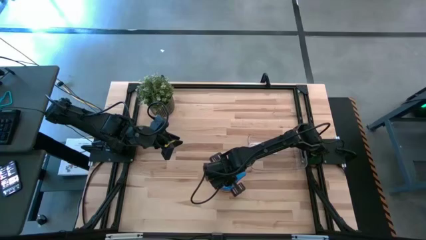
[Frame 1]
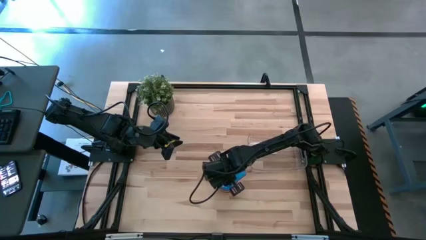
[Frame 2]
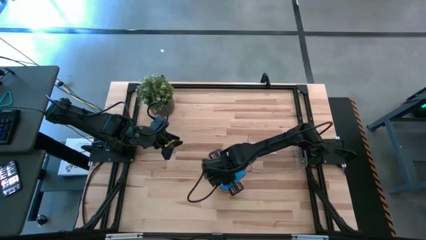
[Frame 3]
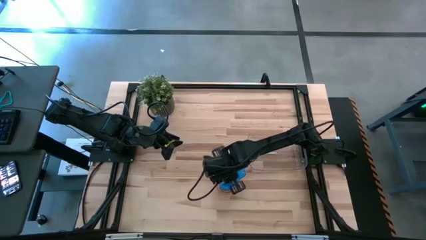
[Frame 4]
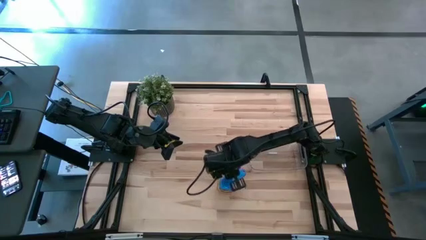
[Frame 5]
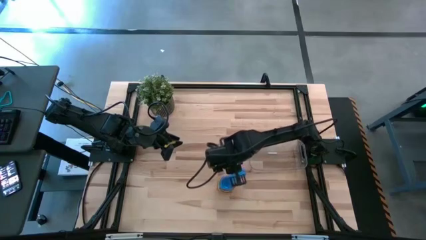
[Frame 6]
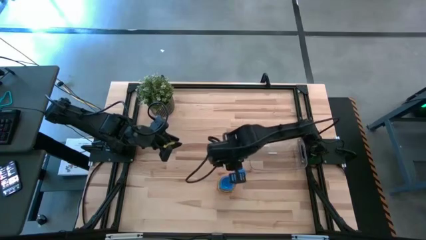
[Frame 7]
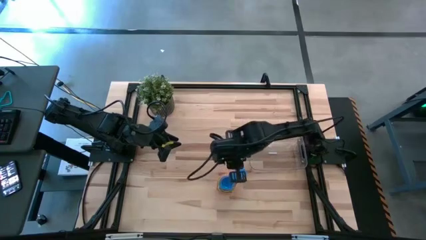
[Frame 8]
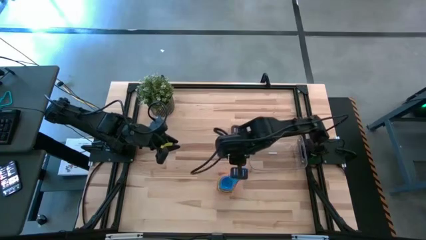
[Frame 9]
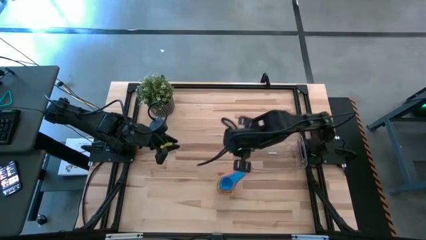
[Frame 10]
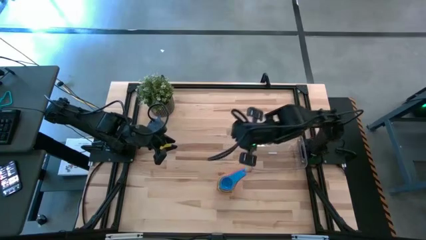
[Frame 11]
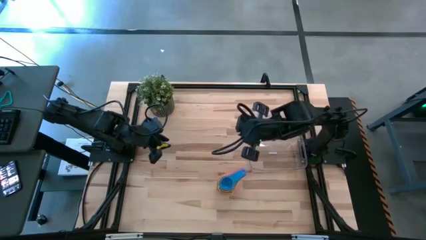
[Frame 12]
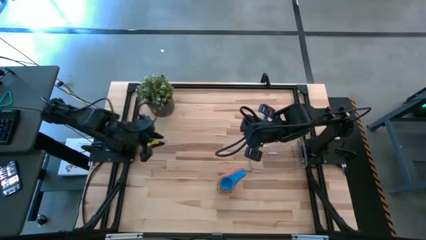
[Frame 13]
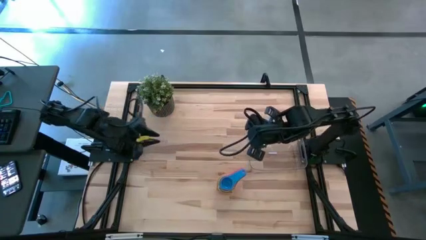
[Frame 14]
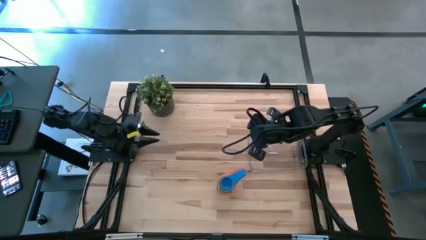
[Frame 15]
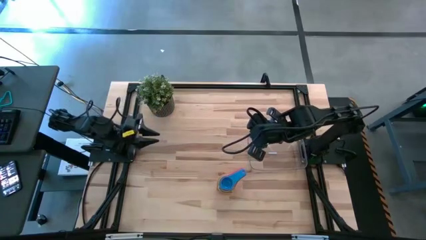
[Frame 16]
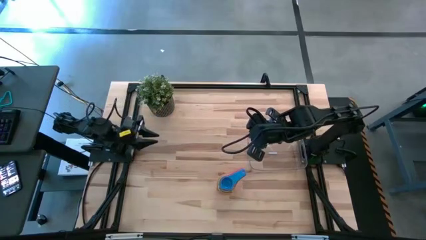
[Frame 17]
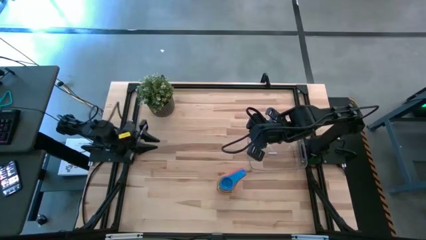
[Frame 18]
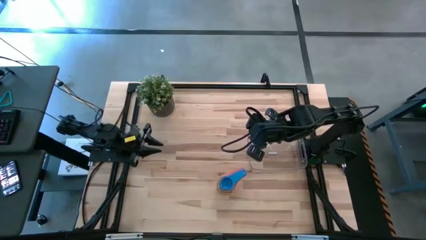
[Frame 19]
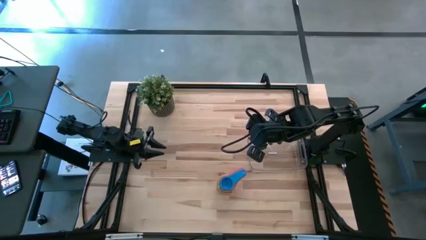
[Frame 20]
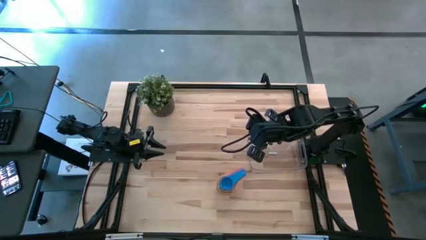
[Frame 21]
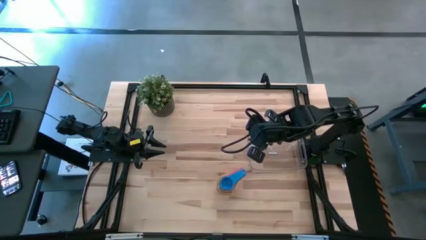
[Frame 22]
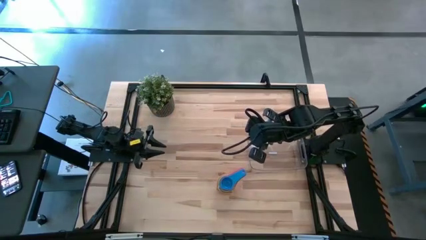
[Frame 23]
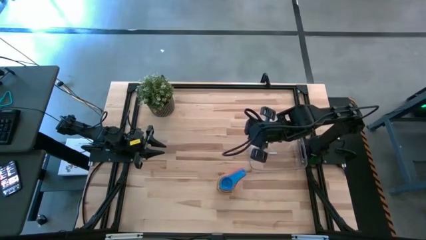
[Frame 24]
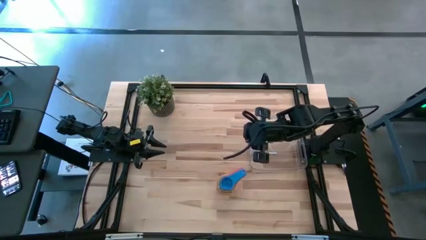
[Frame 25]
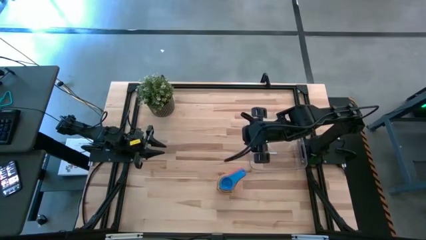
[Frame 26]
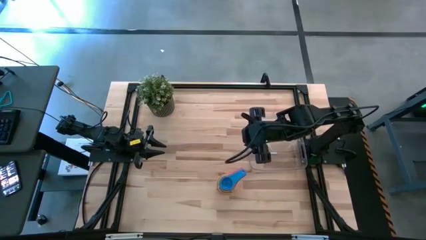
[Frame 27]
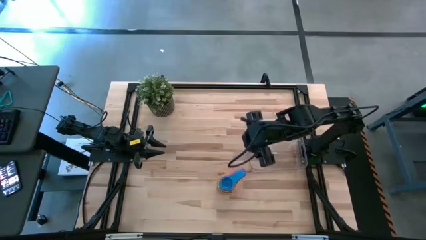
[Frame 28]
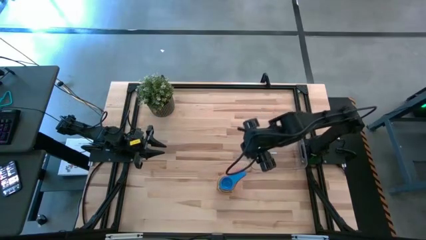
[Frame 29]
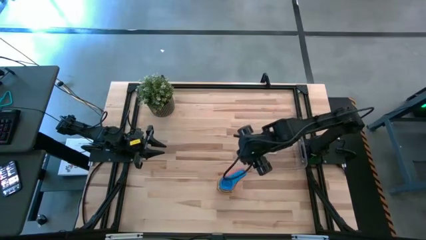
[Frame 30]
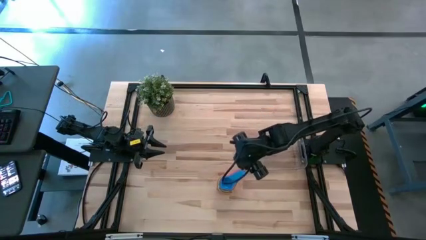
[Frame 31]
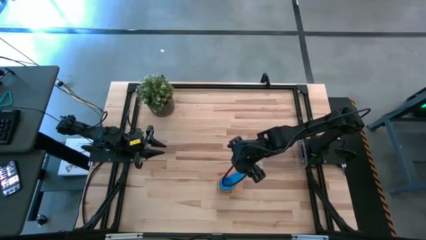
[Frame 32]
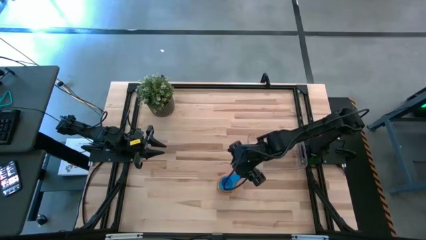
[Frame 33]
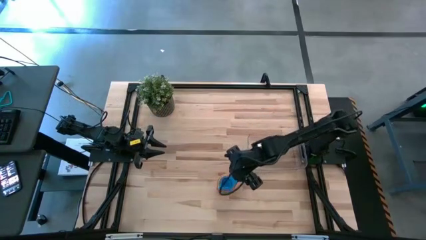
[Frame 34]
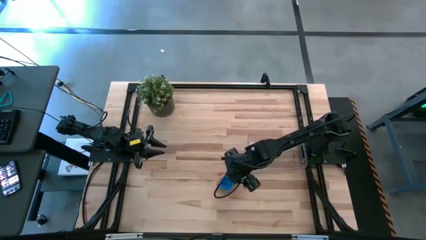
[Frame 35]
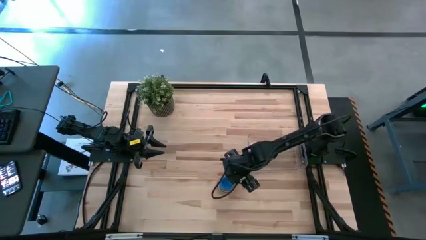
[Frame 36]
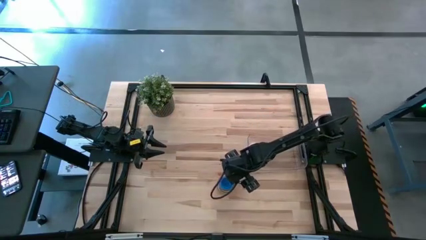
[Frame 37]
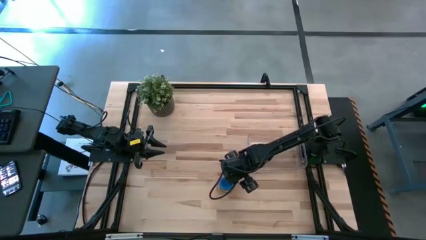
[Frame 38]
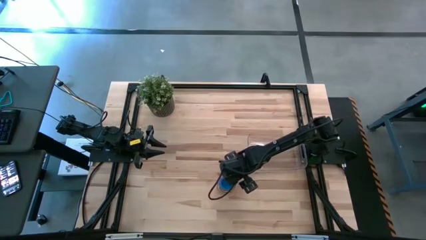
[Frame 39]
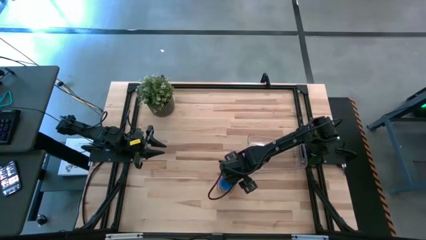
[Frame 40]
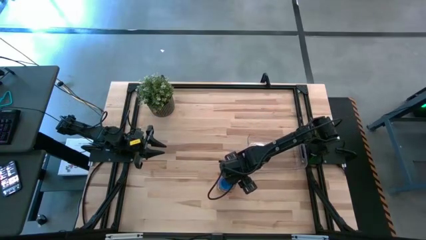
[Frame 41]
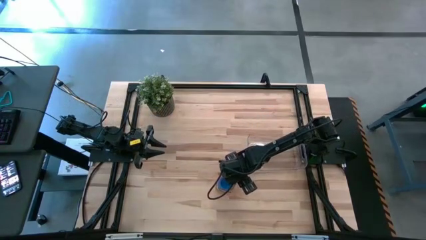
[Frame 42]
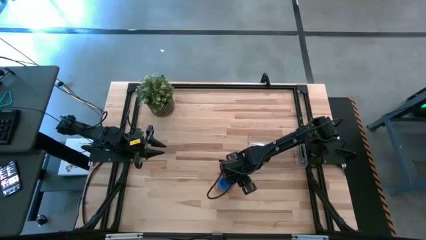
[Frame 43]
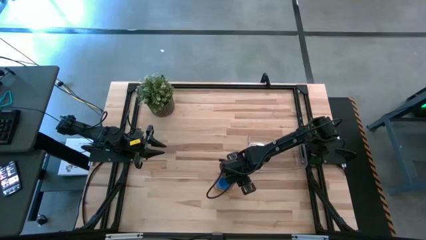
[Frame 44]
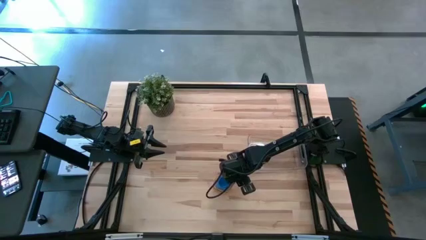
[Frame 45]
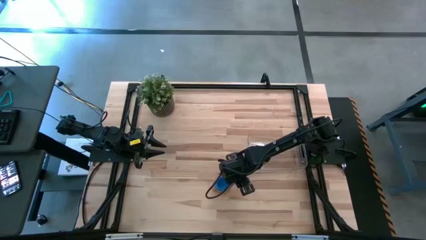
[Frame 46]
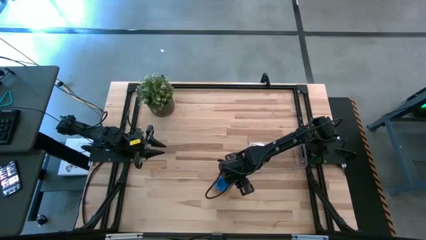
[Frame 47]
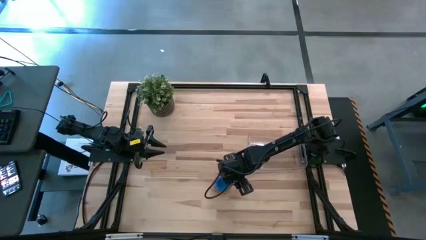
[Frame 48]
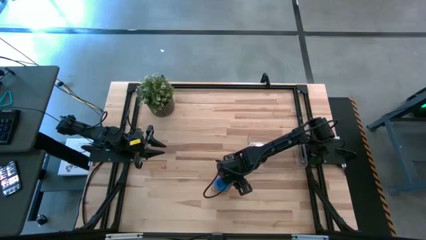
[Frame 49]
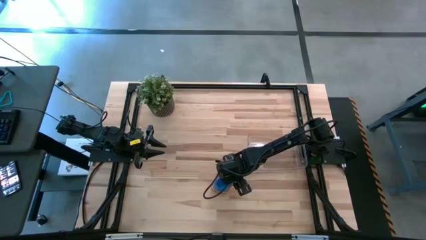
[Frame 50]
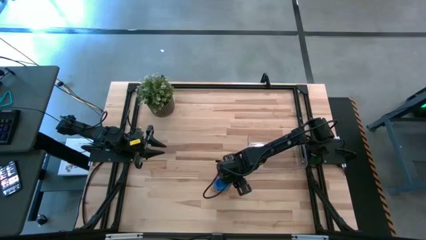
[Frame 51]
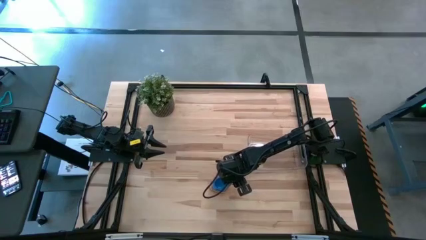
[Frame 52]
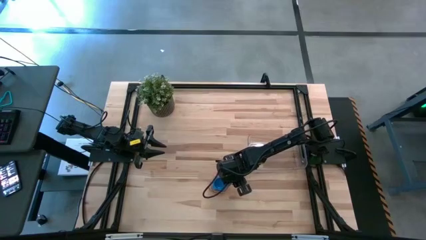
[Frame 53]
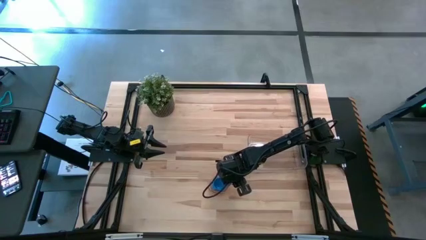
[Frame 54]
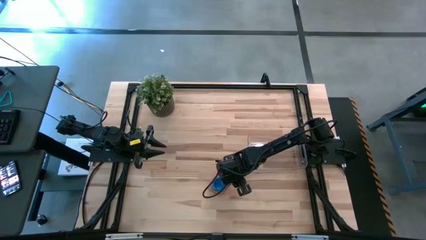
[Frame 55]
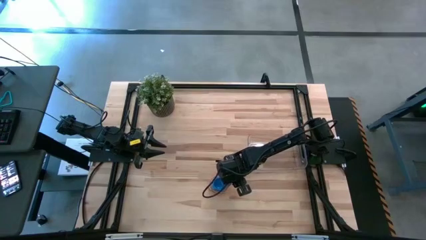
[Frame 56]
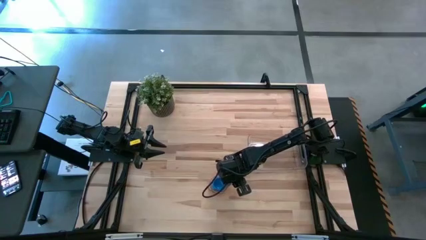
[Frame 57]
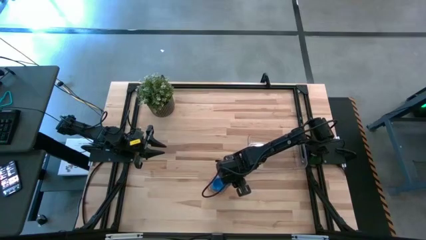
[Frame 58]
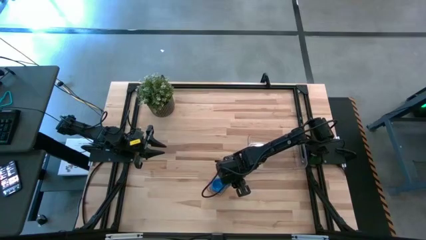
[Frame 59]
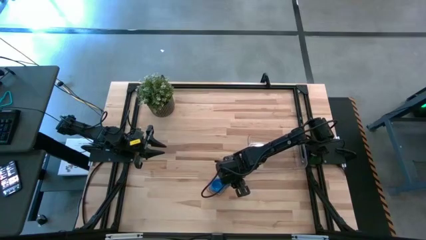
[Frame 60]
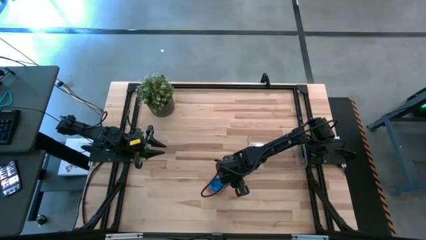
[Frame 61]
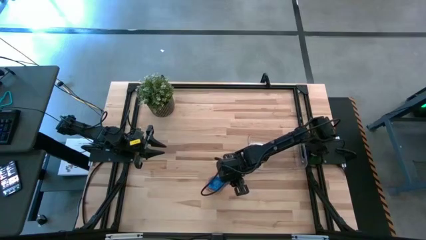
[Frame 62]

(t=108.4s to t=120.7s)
Task: Nest measuring cups in basket
Put the stacked measuring cups into the transparent bin

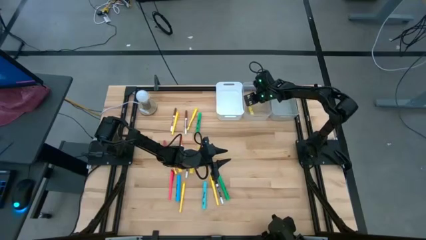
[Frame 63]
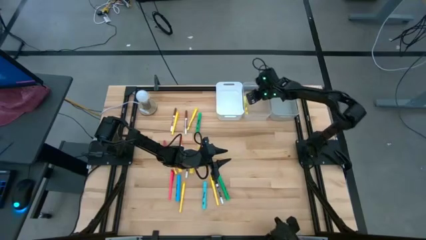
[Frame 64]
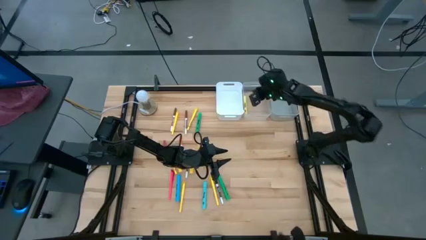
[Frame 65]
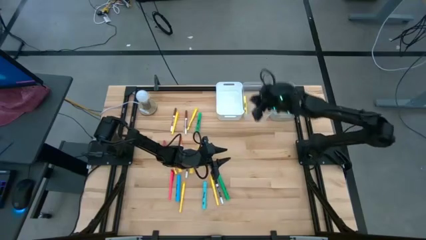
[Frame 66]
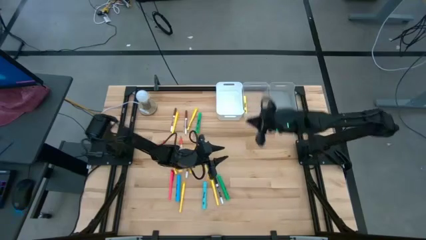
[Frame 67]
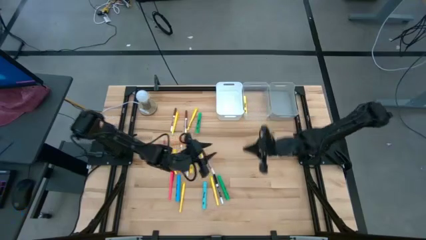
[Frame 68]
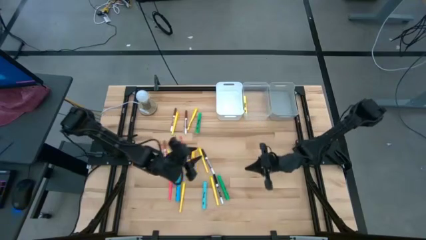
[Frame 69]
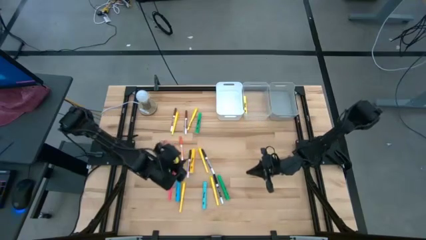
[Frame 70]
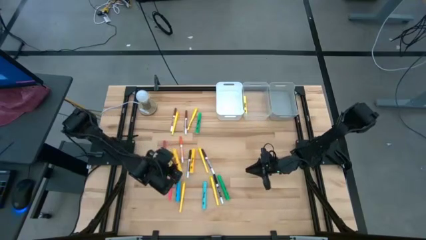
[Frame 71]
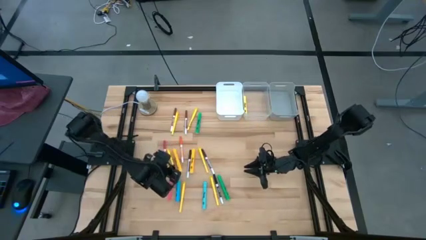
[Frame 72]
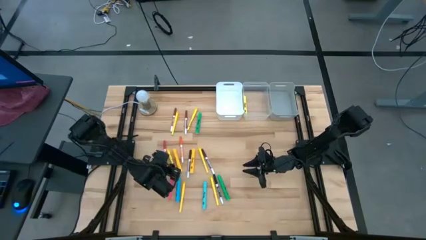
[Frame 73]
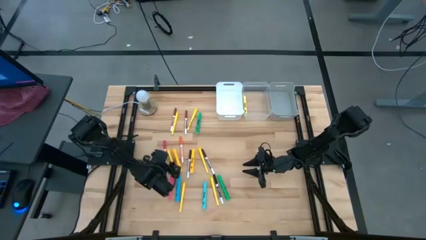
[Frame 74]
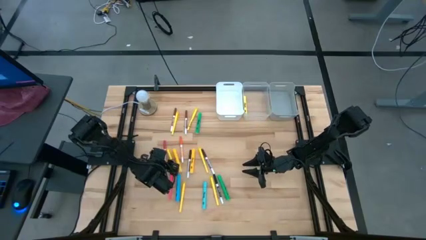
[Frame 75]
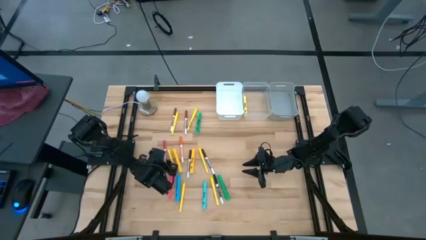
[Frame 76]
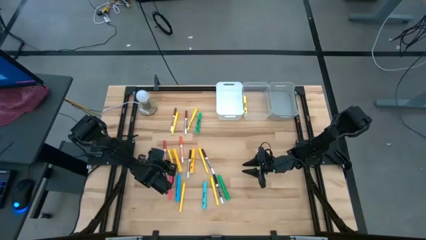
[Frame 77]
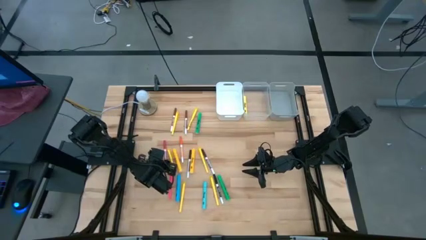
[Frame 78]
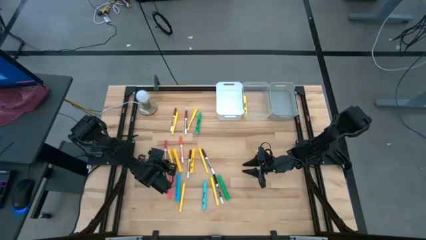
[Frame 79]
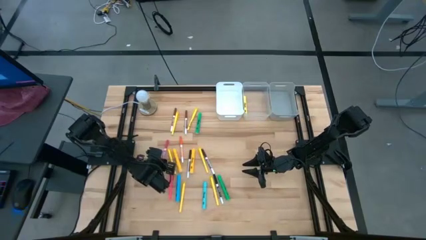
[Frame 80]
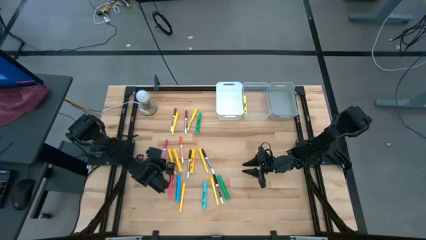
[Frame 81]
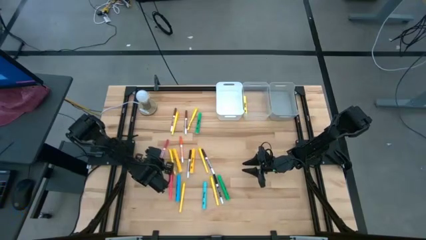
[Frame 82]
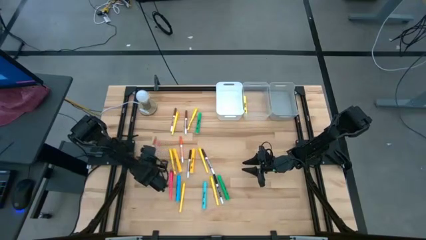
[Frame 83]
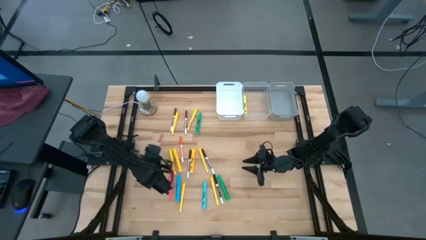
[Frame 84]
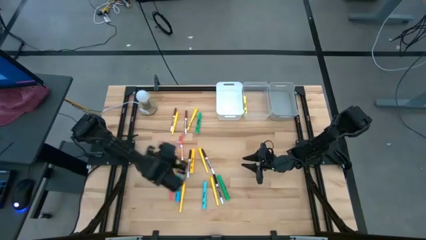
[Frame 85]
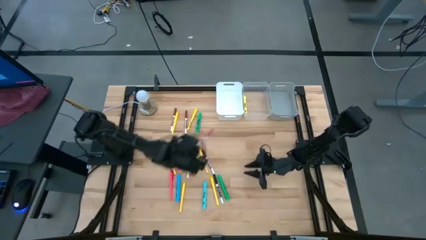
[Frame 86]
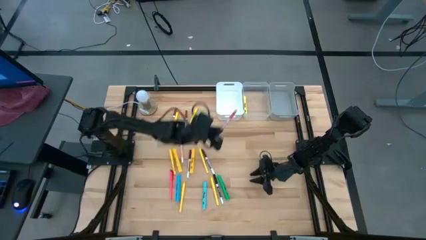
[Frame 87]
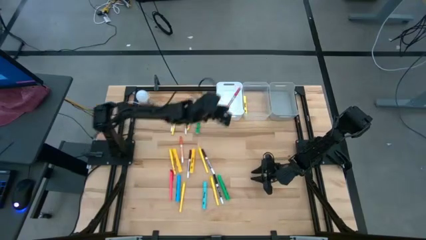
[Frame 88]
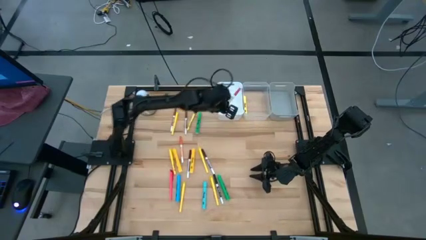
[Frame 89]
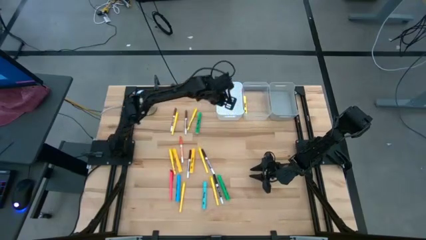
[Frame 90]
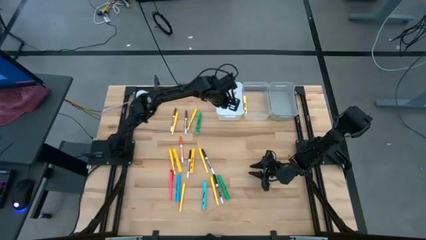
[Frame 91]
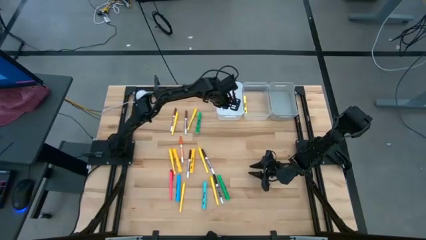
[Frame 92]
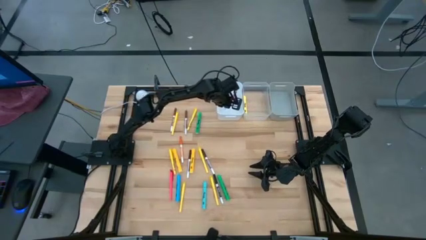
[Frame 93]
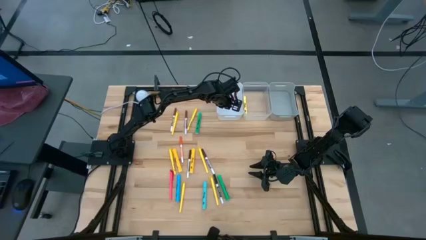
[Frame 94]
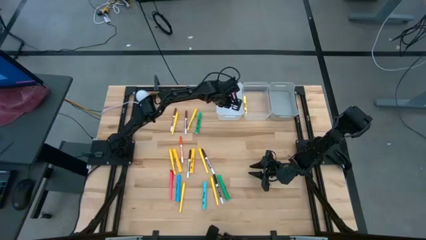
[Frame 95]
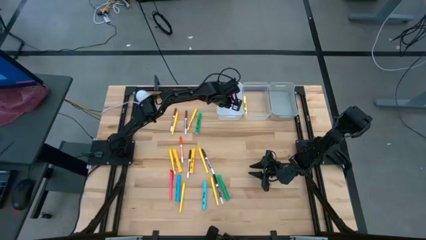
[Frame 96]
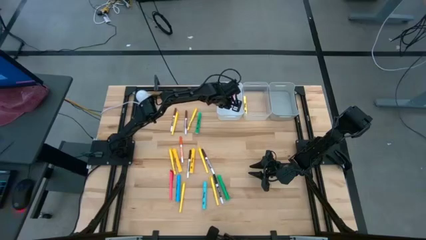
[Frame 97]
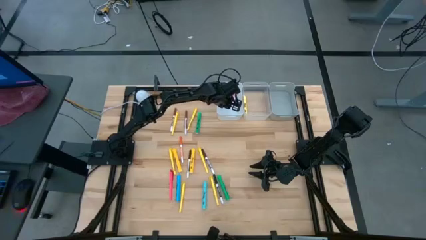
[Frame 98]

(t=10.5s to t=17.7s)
Task: Pick & Place Markers
Put the pink marker pen into the white bin
